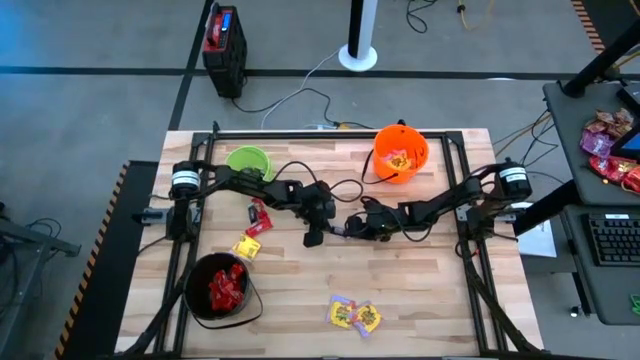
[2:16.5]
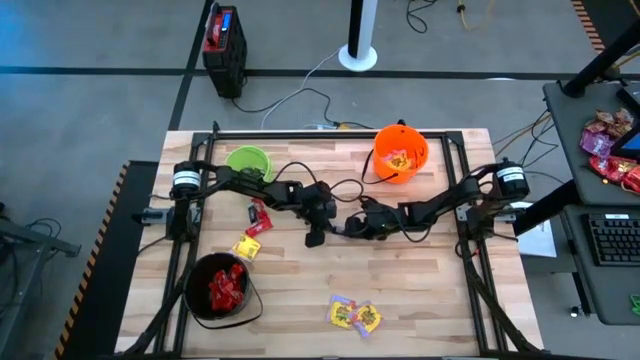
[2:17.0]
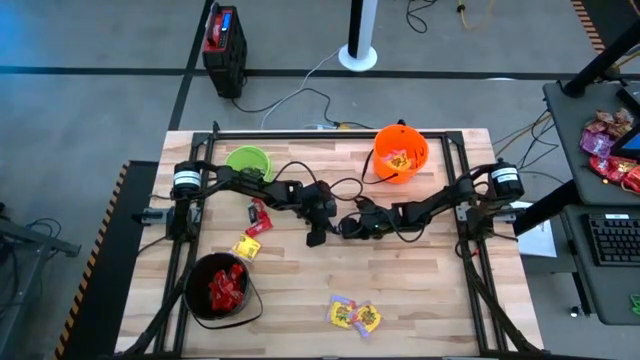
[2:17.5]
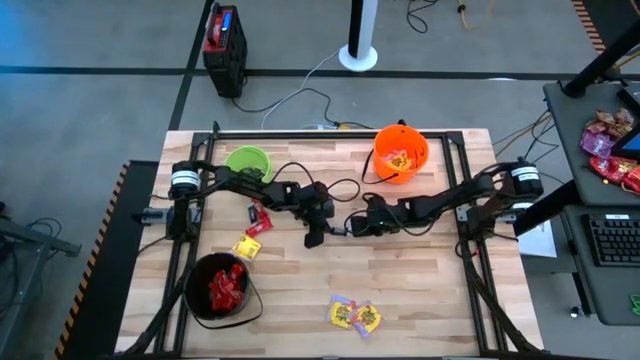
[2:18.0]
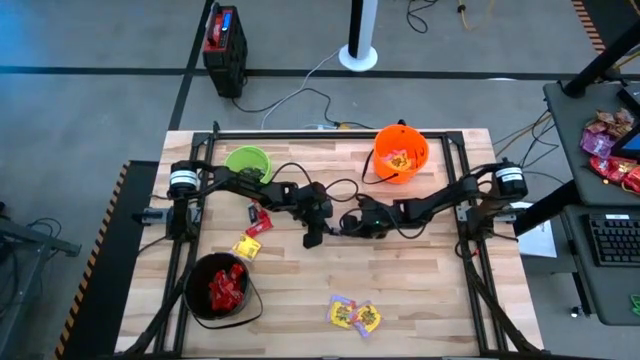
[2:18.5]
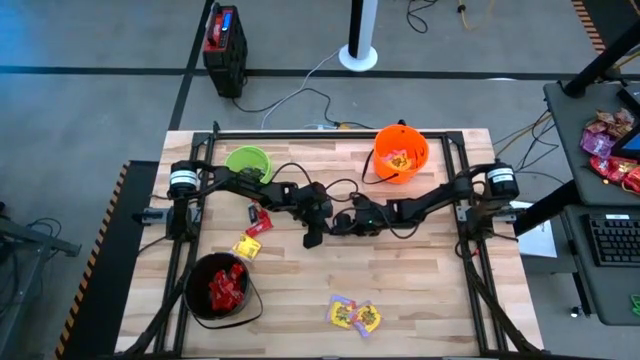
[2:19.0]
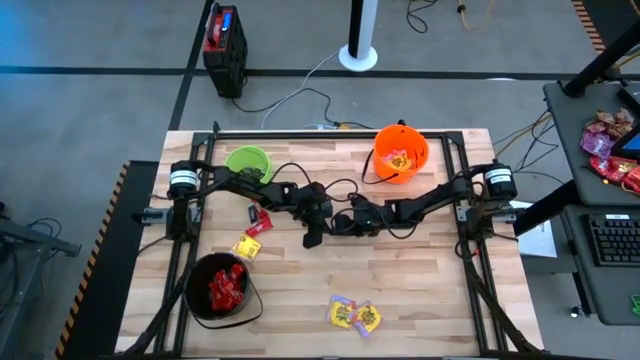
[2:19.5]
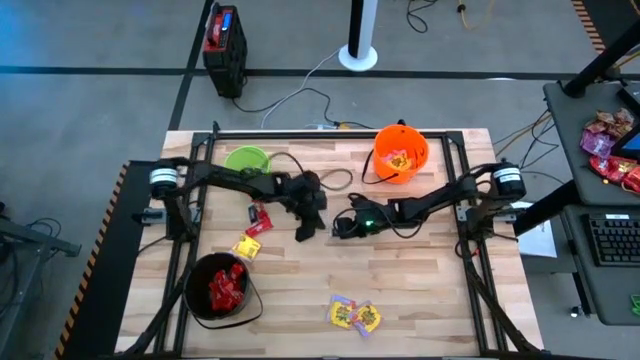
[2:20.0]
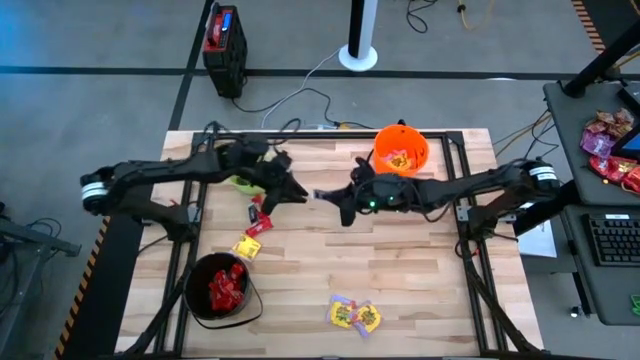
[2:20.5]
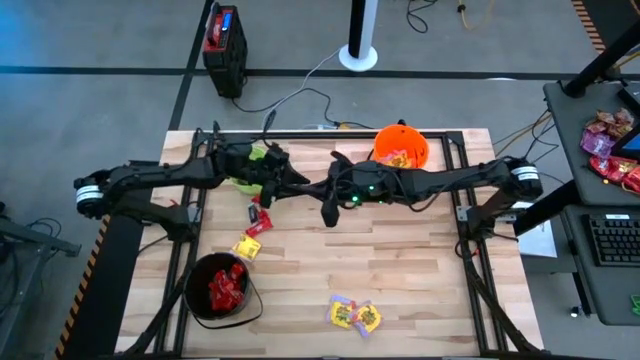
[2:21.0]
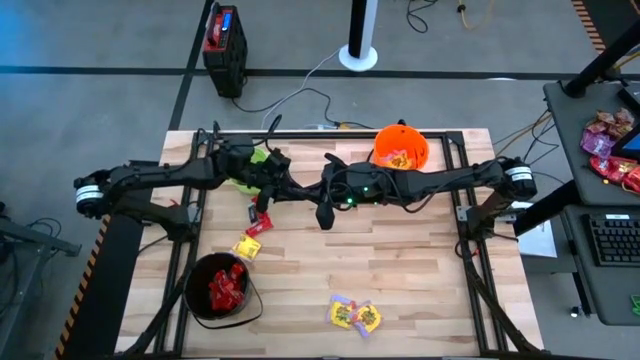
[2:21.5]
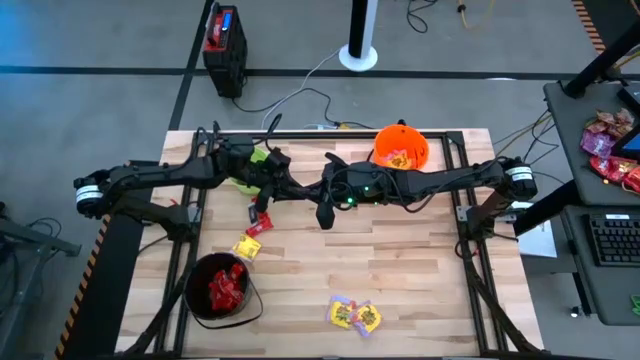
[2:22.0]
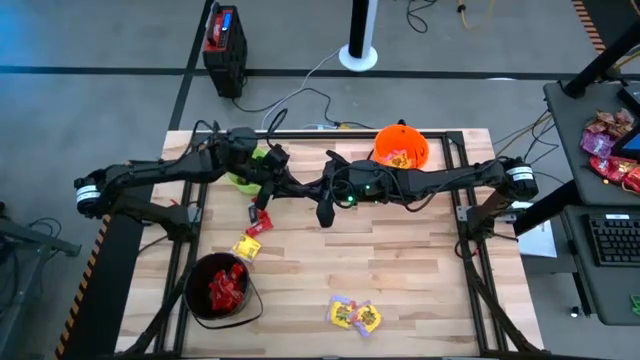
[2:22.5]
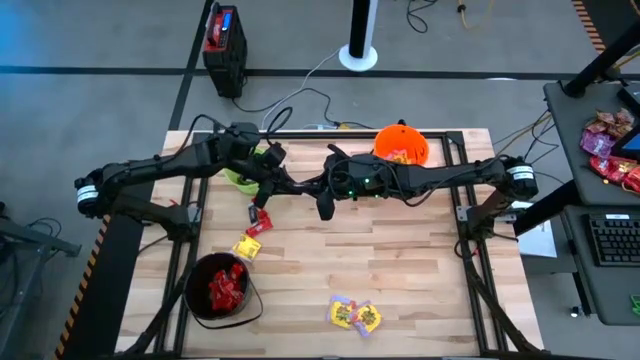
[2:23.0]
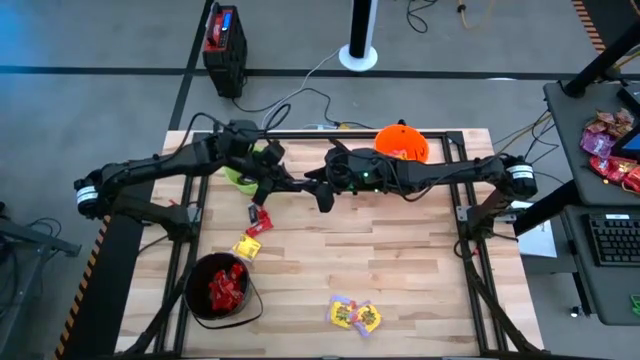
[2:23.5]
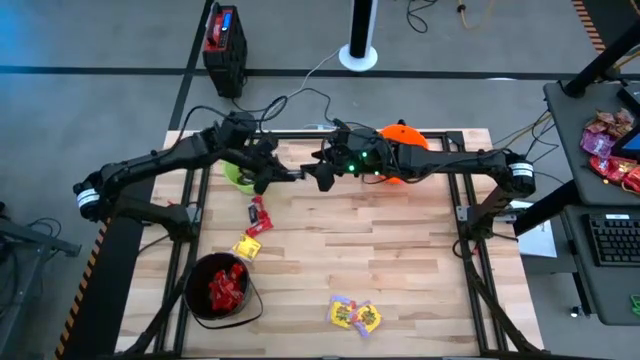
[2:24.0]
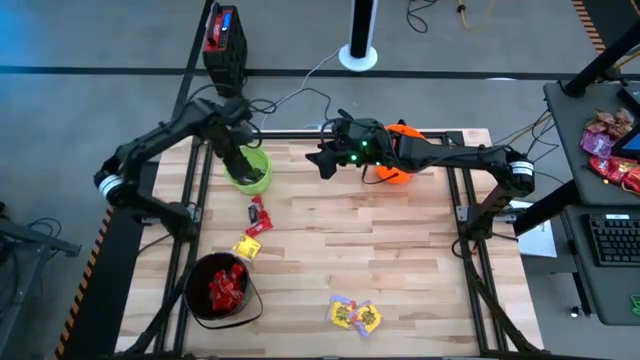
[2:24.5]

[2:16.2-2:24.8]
Task: Sort candy by brand, put in halloween buckets
Put the brown candy into the green bucket

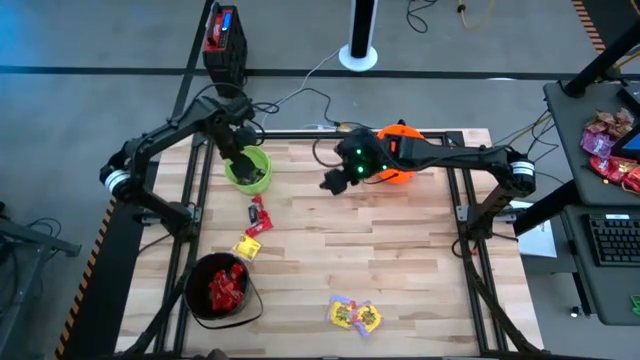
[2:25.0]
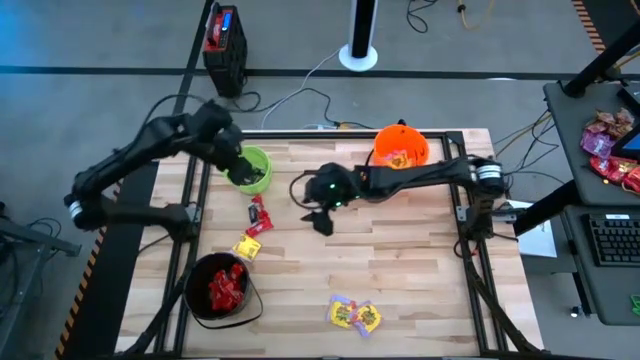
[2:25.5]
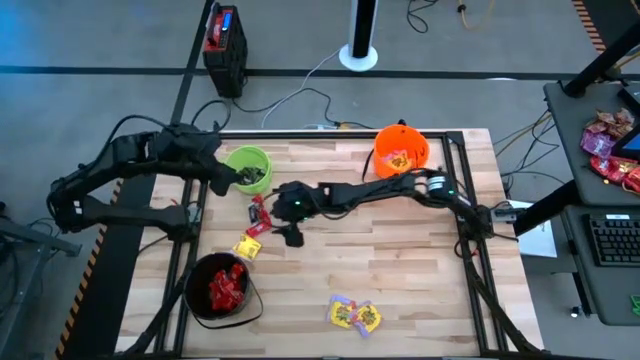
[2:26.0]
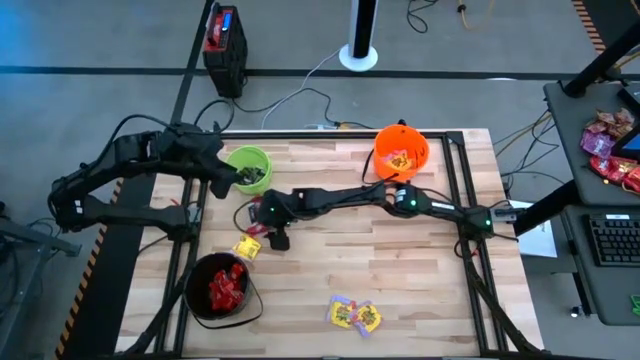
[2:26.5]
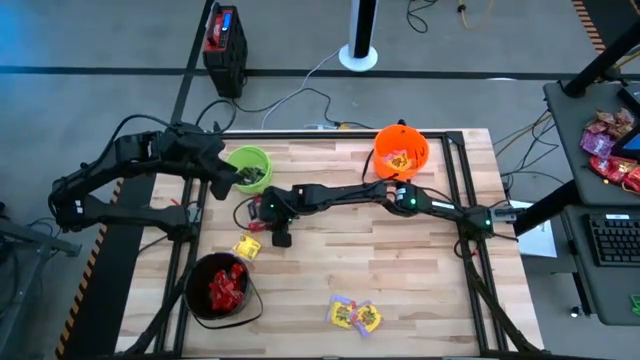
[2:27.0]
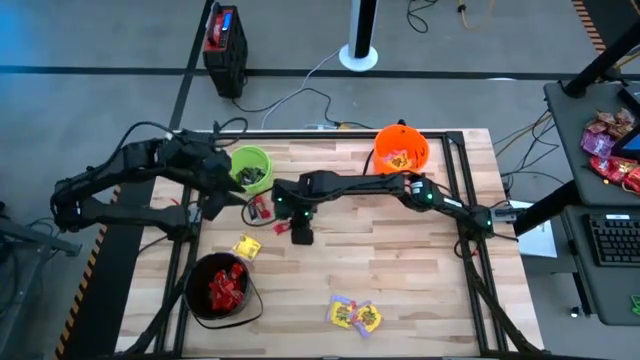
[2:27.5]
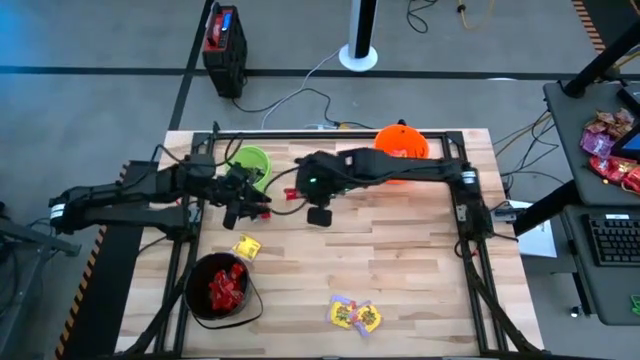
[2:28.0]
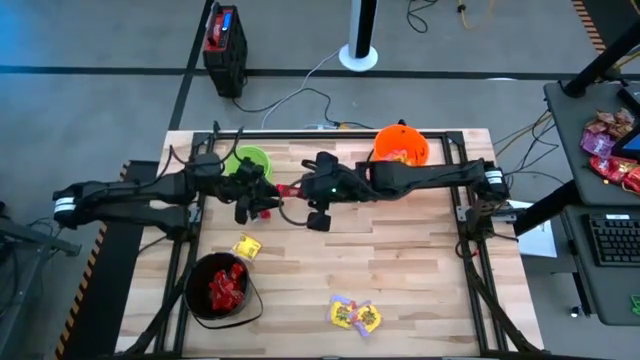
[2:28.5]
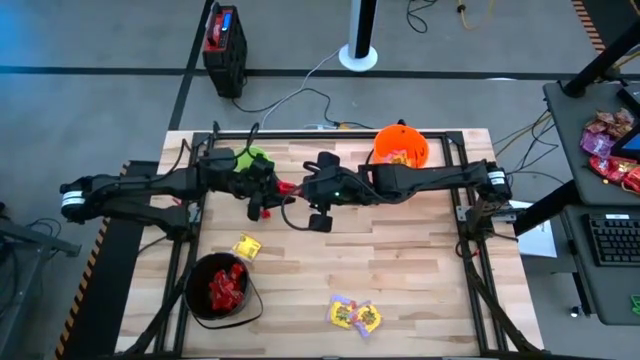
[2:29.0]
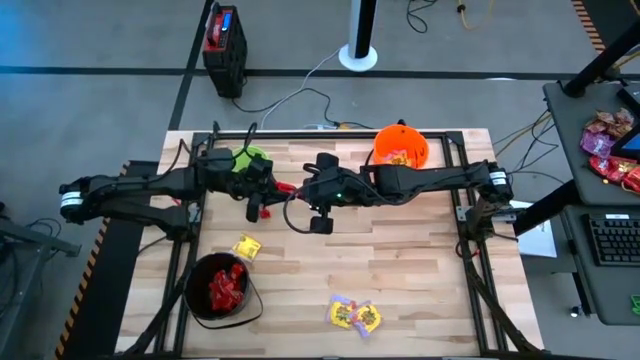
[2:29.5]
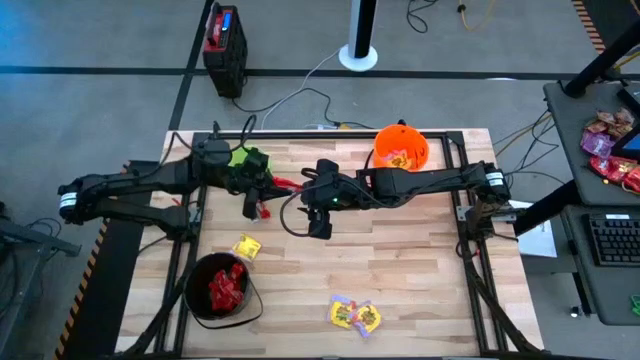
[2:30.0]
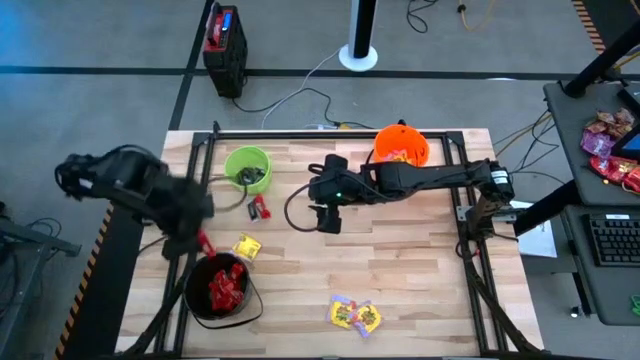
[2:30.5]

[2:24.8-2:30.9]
Put the red candy into the black bucket

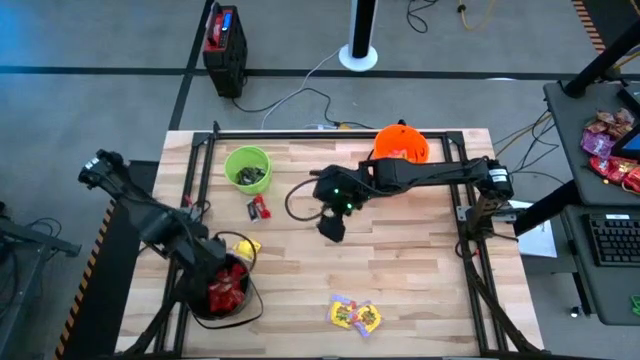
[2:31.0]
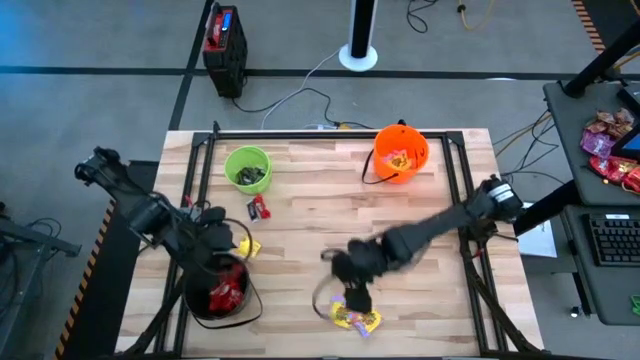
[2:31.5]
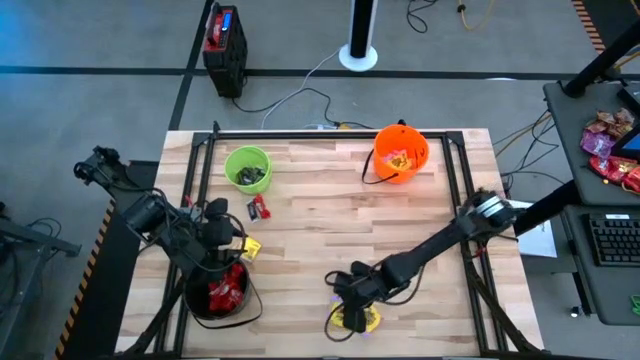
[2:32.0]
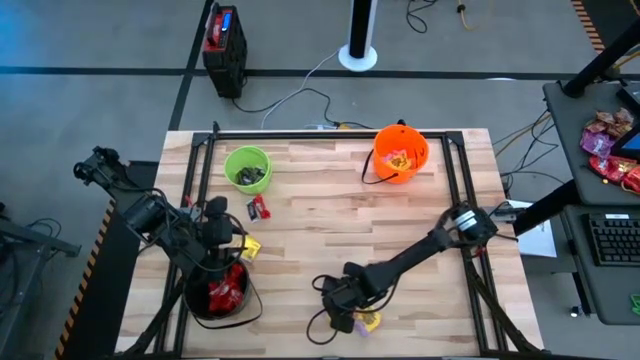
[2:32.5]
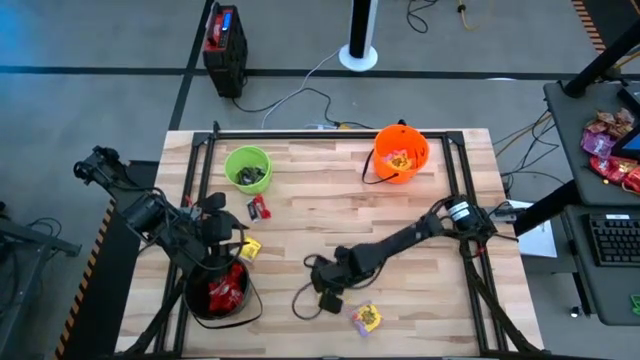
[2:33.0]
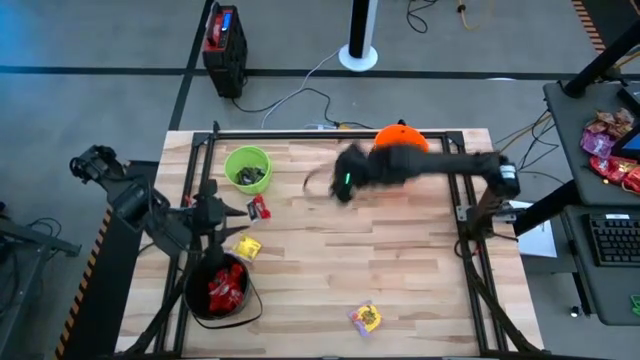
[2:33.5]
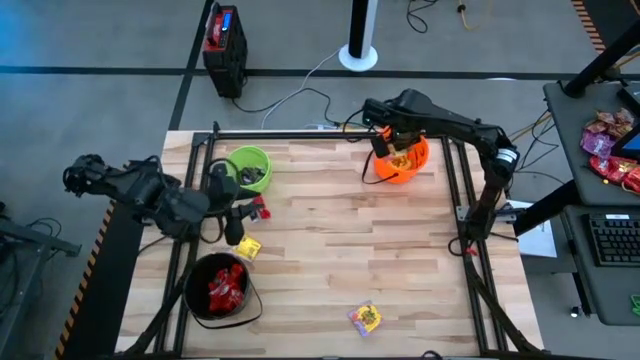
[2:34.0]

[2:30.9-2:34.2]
Put the yellow candy into the orange bucket

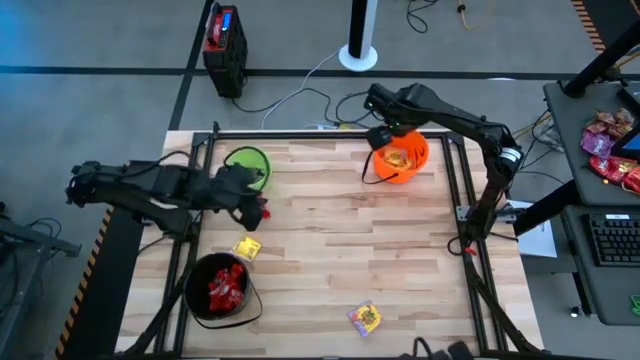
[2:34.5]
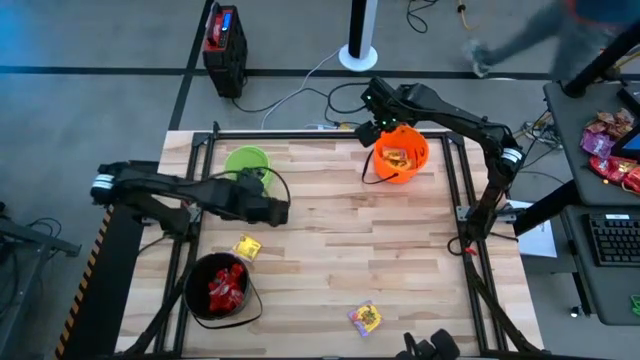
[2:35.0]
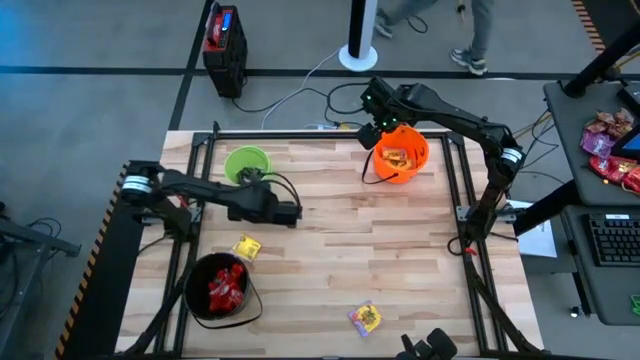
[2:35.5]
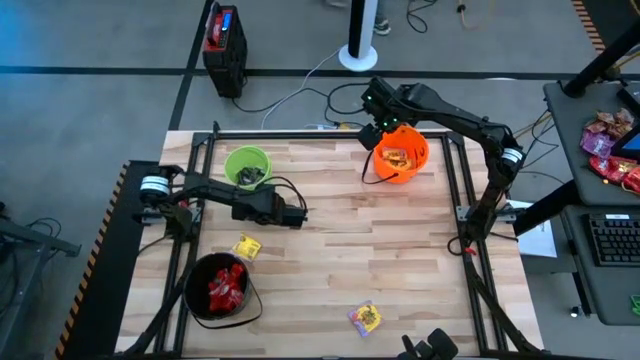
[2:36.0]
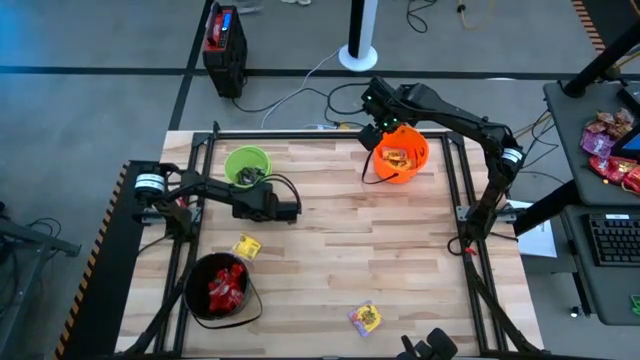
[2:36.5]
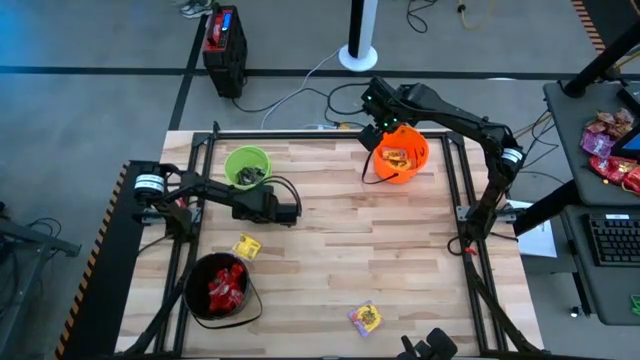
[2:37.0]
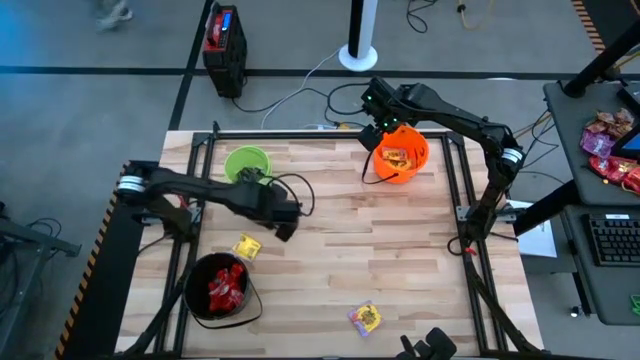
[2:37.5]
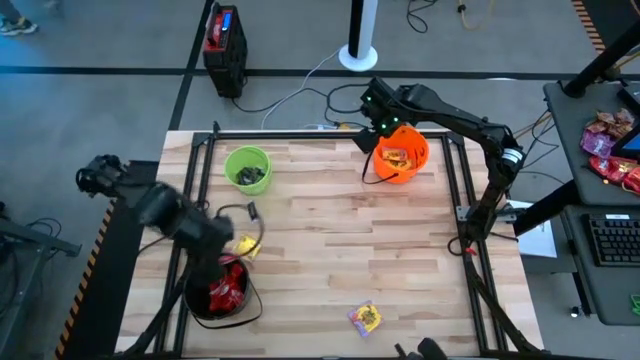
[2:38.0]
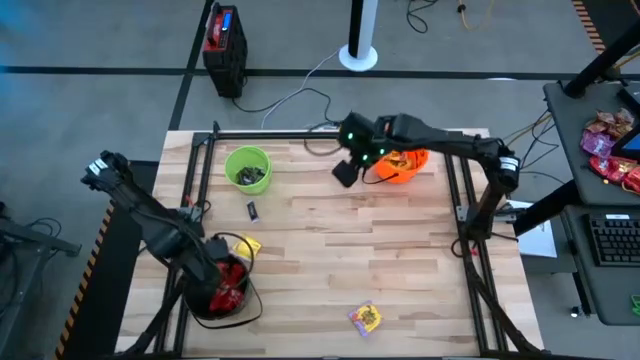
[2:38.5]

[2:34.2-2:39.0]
Put the red candy into the black bucket
